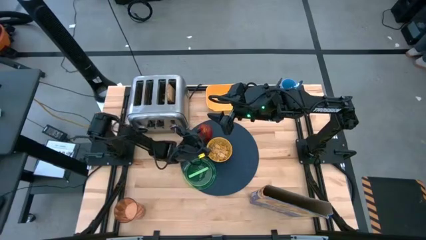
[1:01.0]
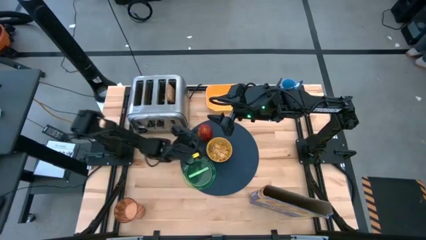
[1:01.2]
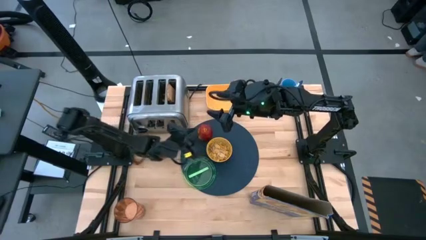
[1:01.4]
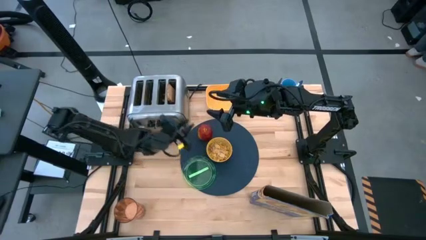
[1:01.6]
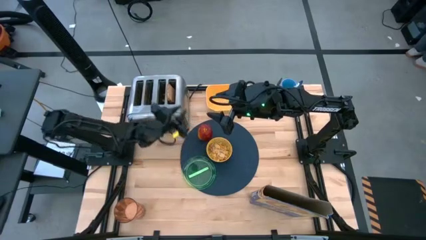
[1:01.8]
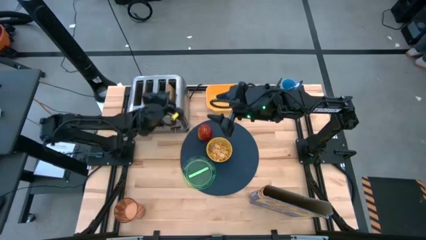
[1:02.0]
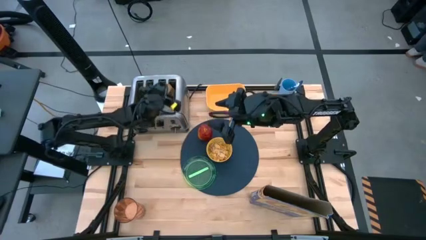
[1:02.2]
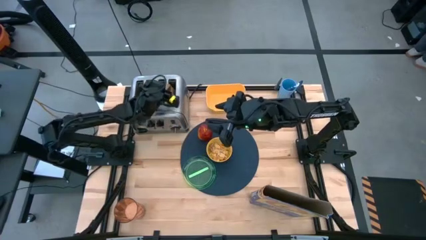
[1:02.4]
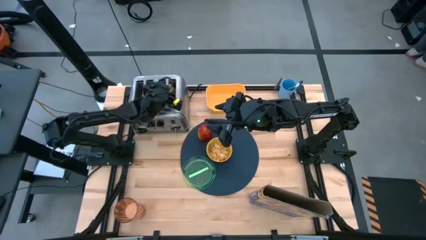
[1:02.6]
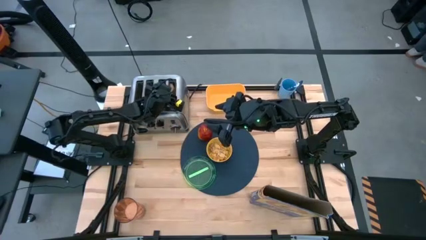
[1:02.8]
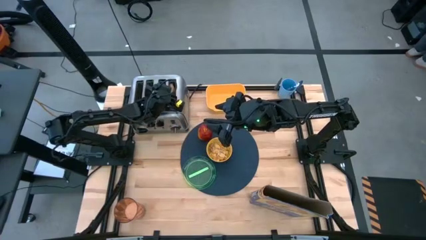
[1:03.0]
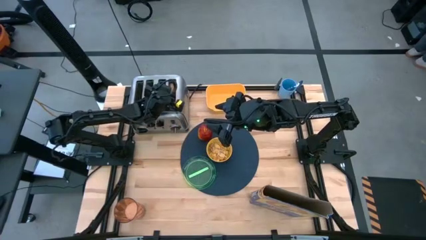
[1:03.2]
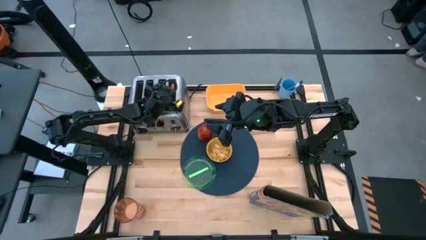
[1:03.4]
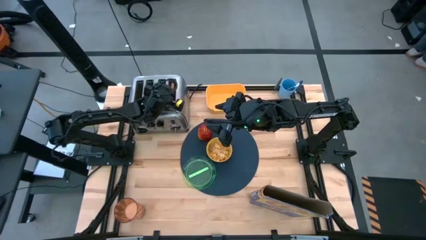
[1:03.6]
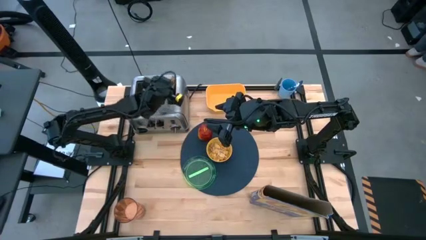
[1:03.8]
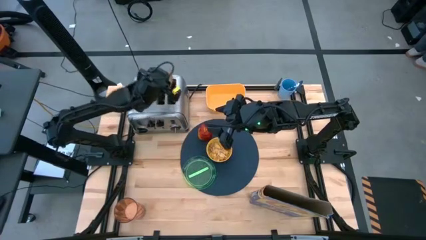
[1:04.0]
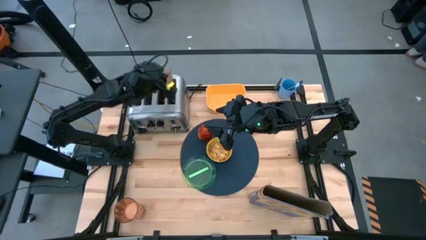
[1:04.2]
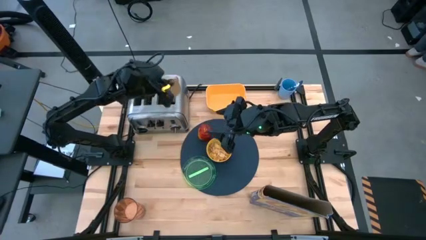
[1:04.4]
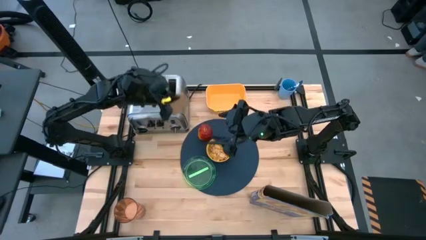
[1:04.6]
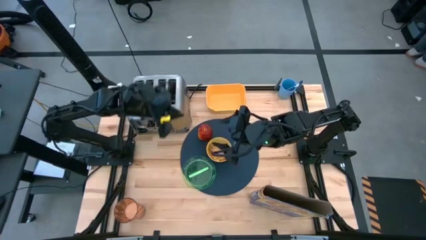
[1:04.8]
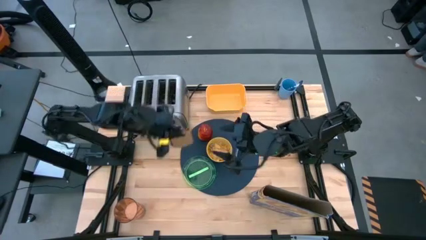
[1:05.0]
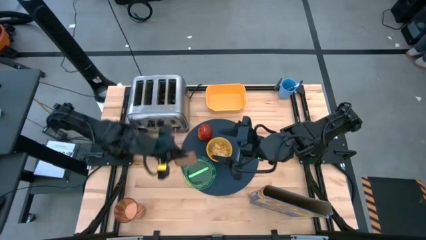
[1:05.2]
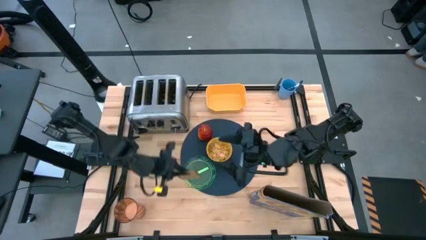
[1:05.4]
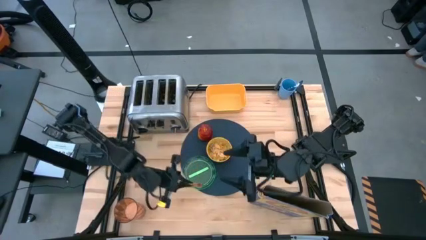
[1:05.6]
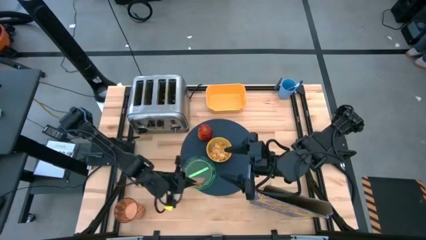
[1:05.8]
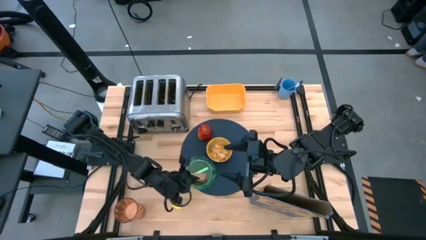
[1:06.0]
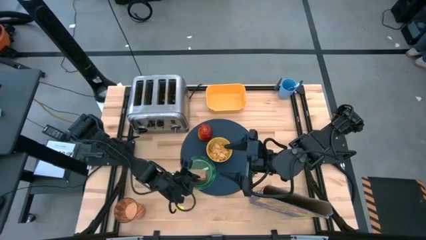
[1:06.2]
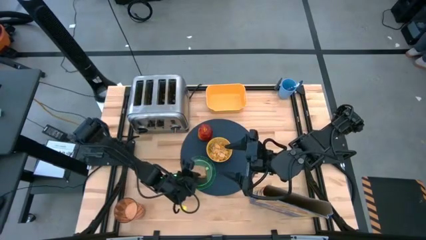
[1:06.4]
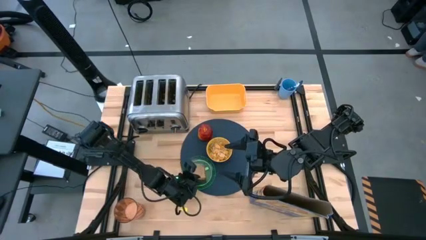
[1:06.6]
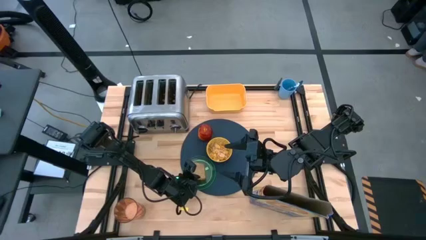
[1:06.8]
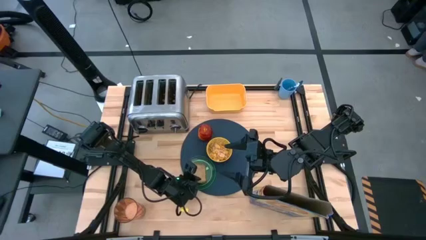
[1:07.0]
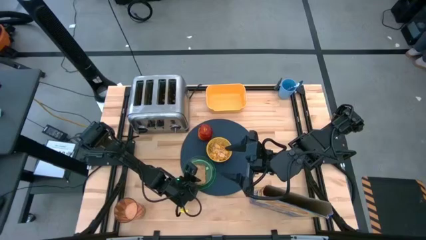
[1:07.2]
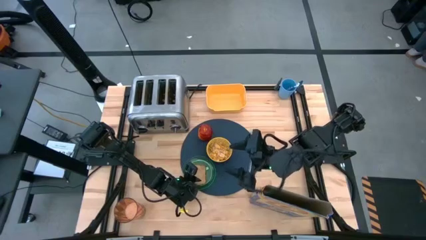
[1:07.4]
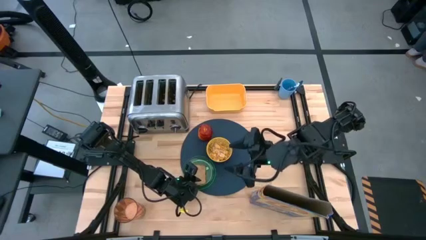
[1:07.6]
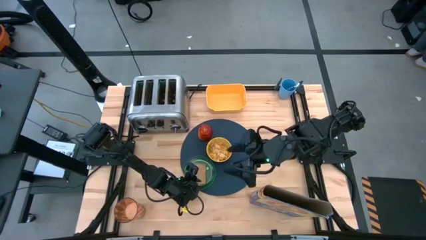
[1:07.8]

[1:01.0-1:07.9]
Task: Arrange a breakfast setting
Put the brown toasted bread from the toaster on the green plate

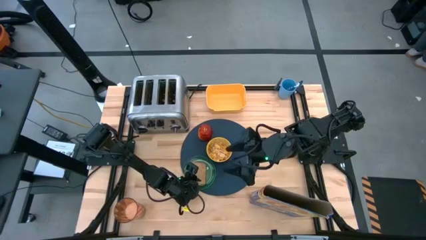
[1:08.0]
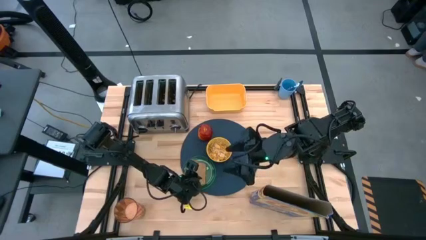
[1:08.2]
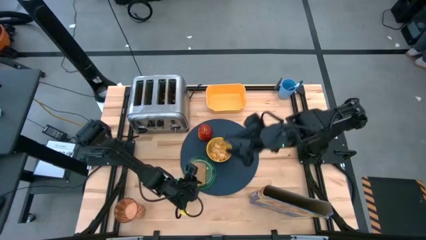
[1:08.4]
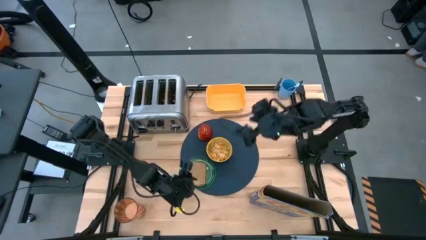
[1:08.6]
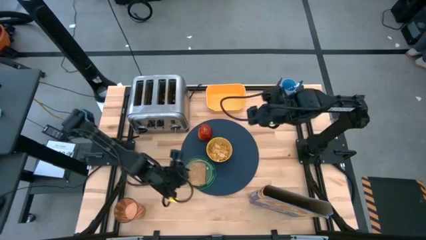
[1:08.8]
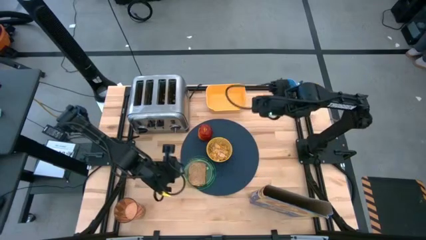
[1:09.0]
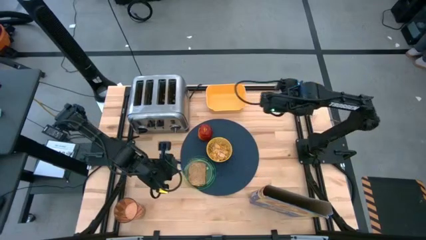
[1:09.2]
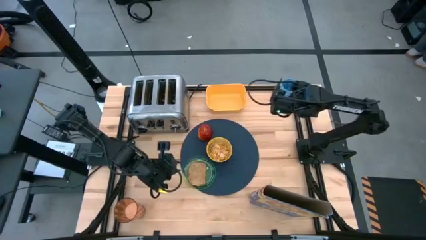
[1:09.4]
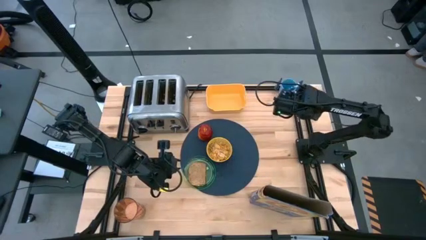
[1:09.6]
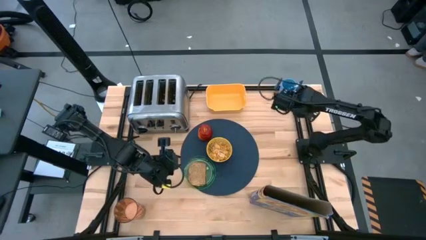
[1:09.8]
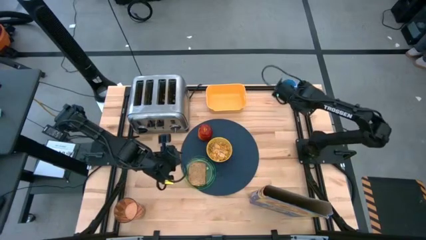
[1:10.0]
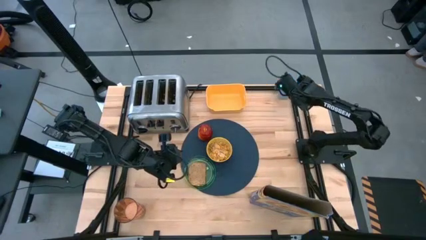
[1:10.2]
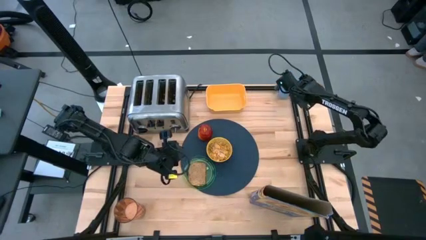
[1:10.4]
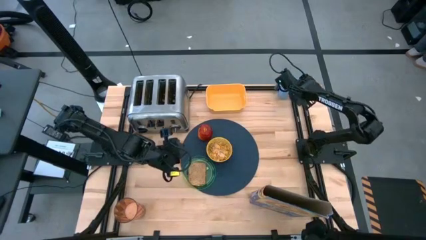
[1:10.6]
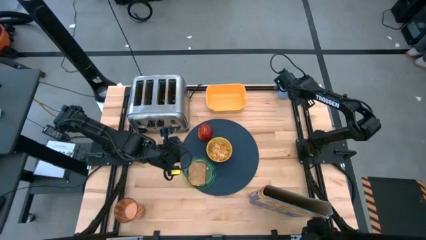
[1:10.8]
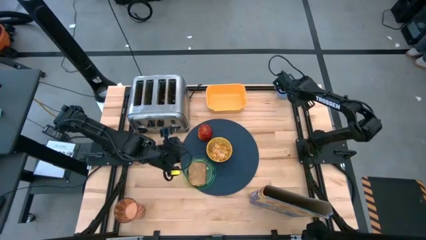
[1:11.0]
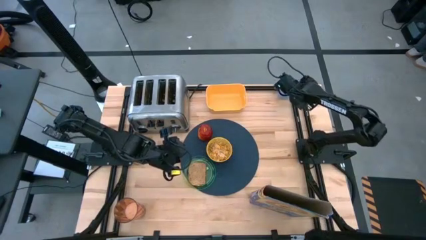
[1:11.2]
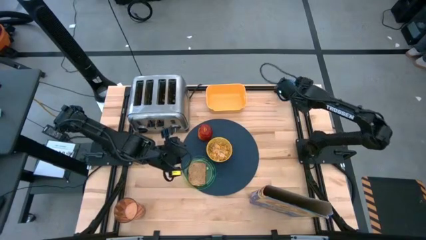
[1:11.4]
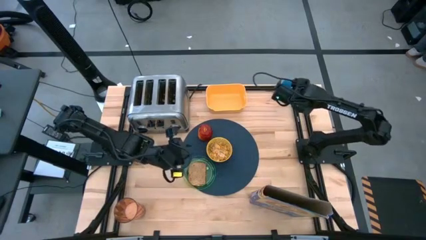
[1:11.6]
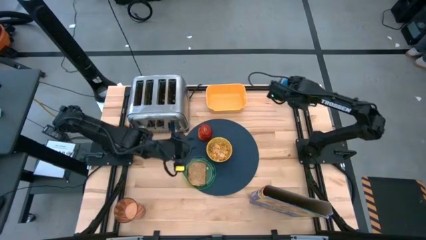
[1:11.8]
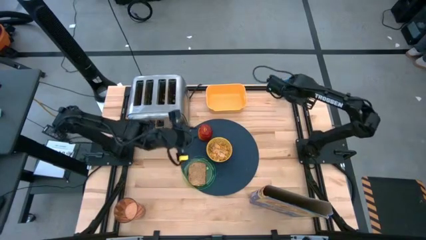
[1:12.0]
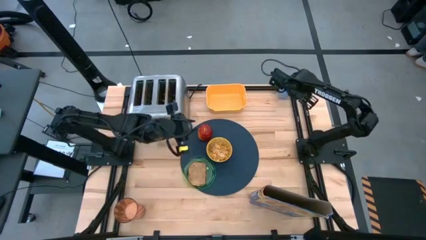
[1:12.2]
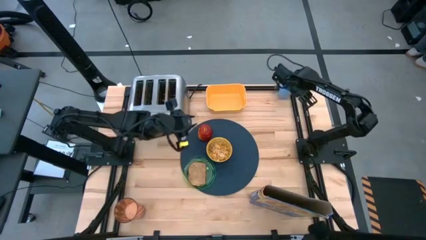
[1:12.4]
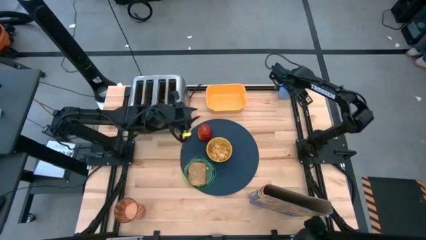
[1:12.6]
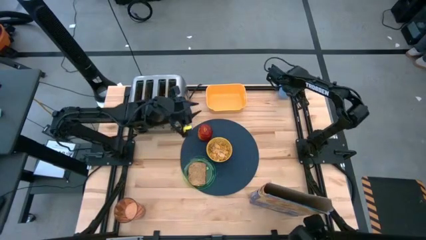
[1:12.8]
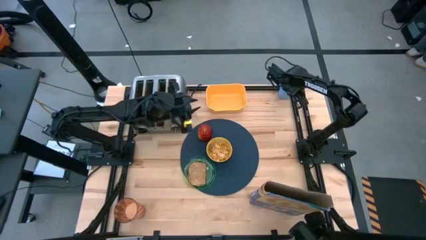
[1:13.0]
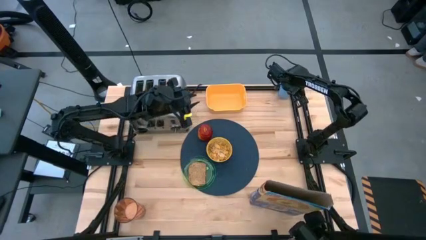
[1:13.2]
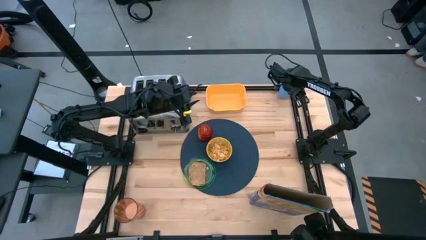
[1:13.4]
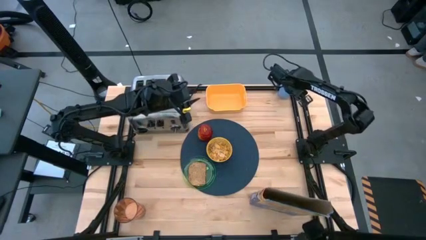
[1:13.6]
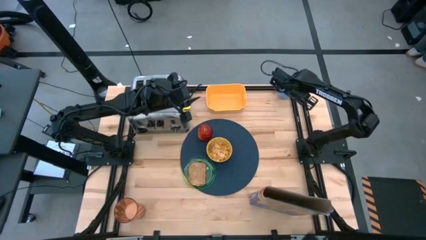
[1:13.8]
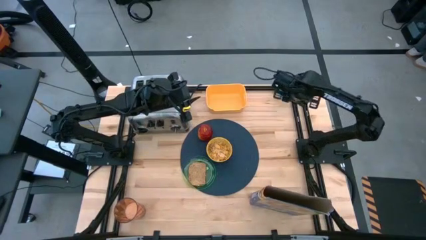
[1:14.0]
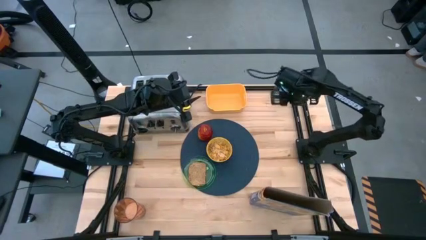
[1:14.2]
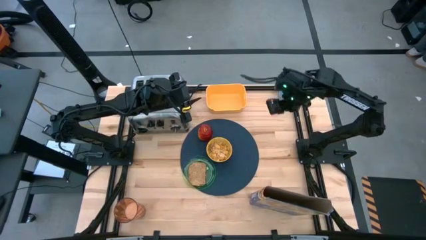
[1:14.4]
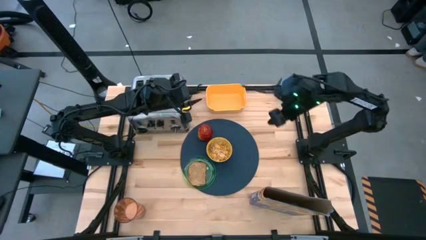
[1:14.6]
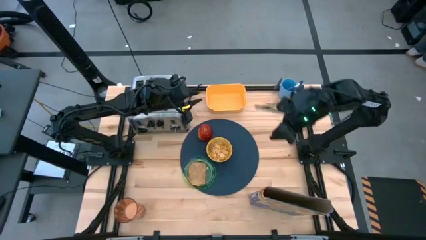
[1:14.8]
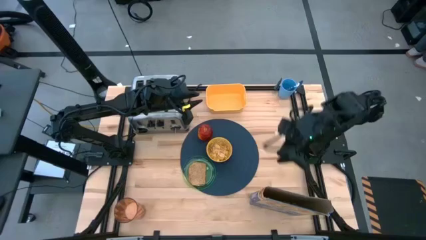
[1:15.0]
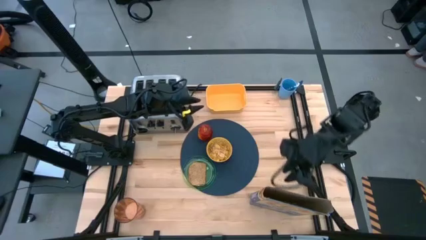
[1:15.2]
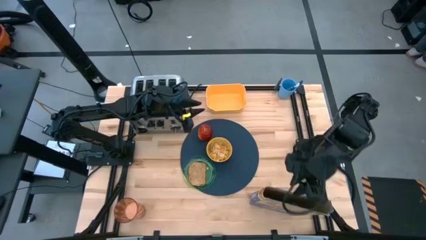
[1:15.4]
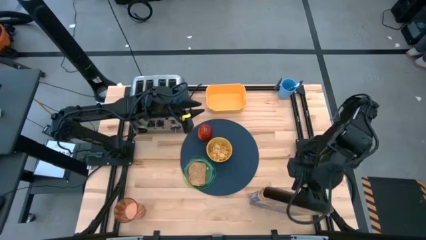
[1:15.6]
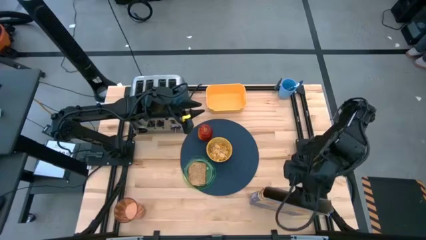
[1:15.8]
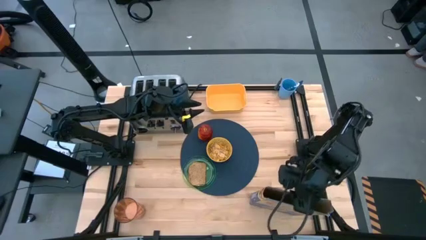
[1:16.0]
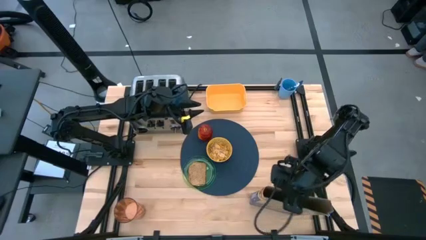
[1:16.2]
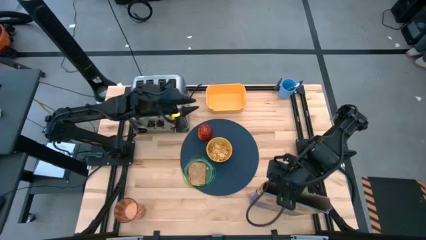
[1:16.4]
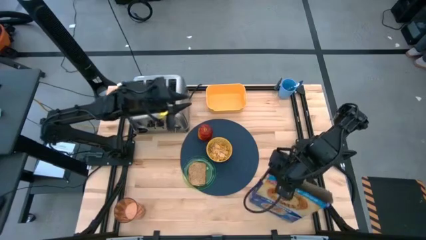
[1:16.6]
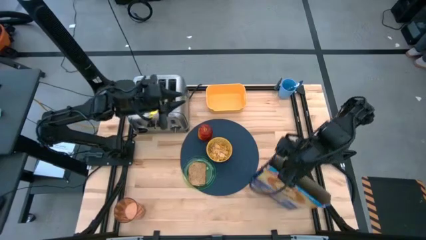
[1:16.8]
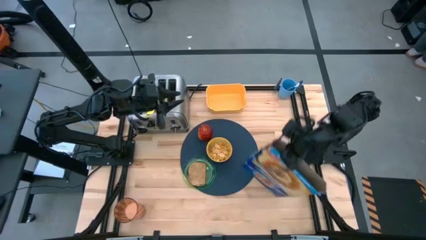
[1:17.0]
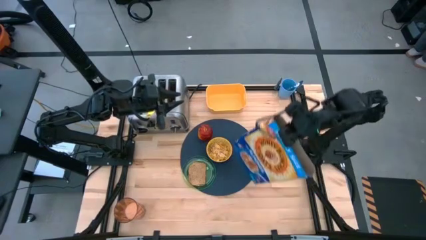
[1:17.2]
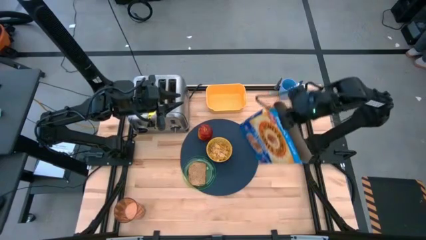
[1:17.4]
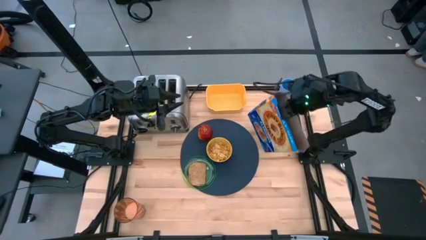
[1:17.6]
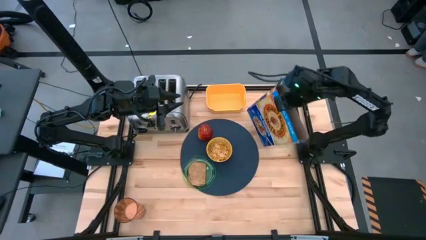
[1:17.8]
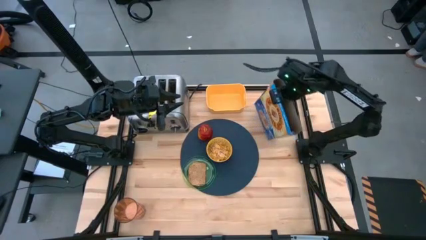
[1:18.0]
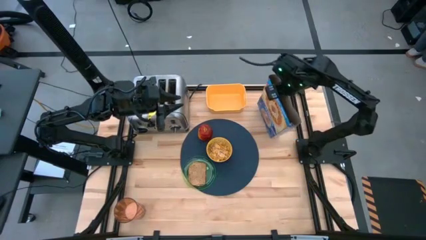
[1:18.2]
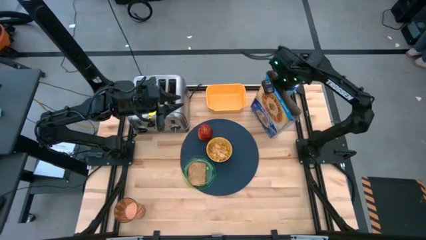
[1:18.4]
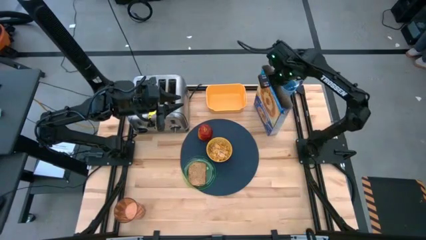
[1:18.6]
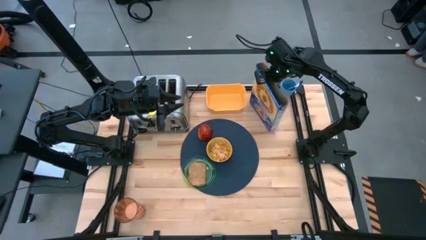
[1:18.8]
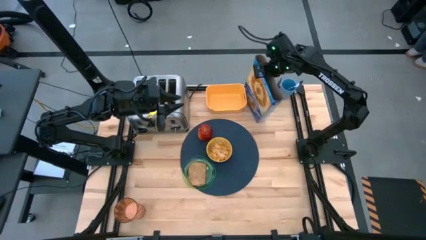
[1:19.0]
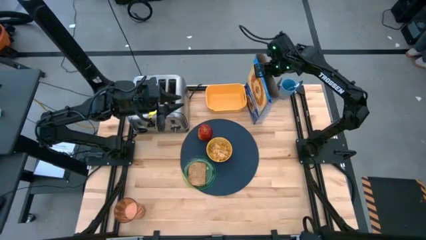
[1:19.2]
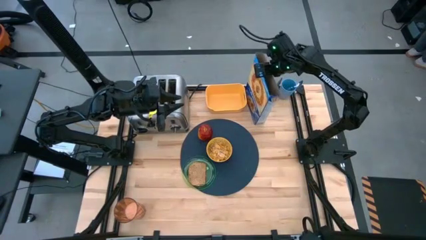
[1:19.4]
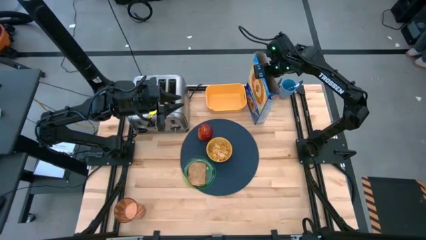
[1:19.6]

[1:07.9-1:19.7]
Move the blue cereal box to the right of the yellow bin
